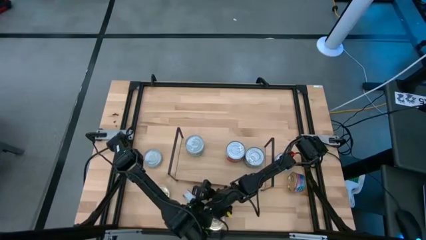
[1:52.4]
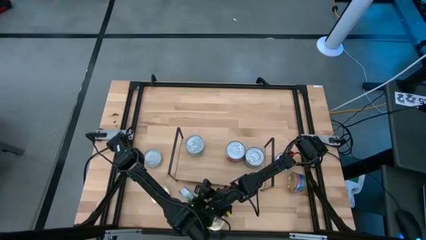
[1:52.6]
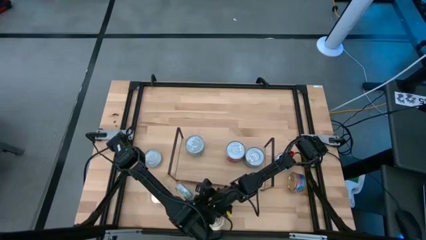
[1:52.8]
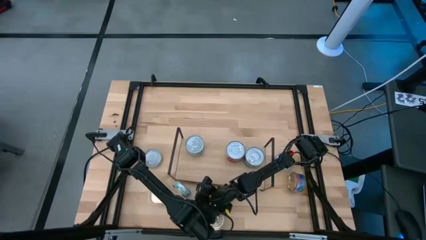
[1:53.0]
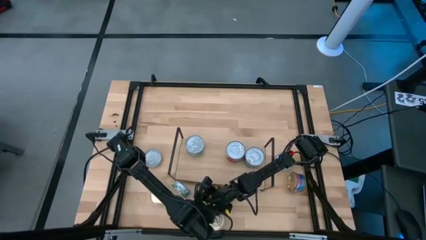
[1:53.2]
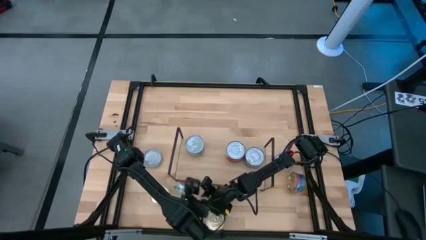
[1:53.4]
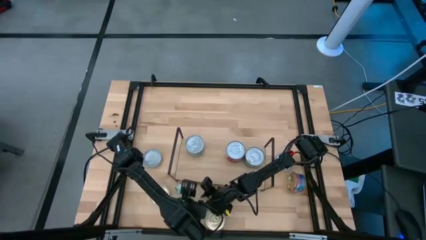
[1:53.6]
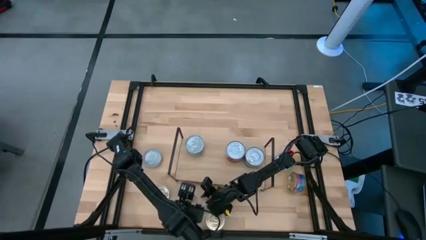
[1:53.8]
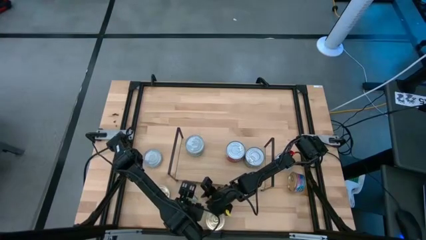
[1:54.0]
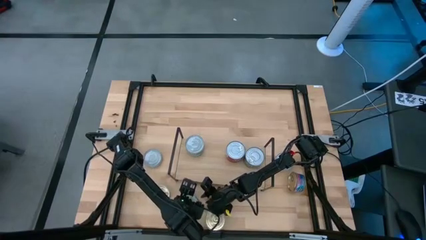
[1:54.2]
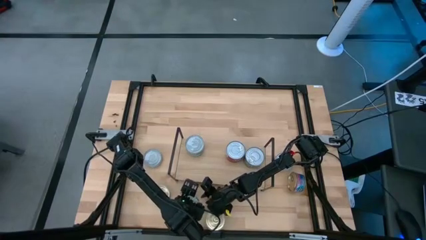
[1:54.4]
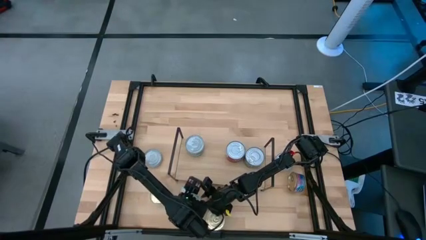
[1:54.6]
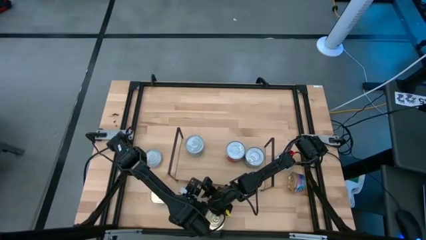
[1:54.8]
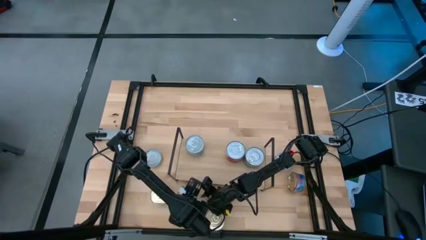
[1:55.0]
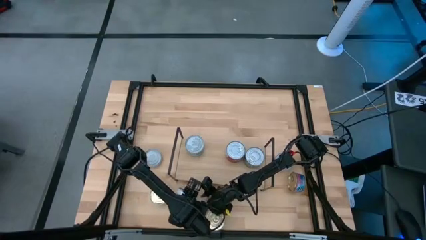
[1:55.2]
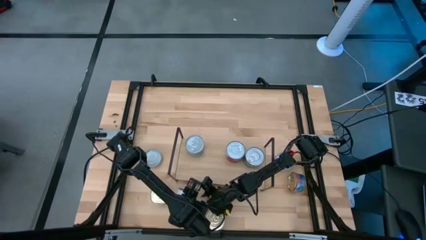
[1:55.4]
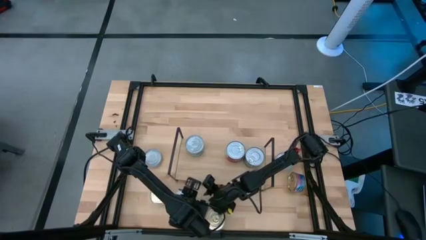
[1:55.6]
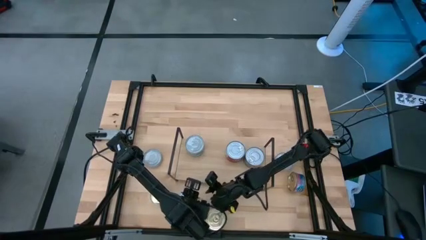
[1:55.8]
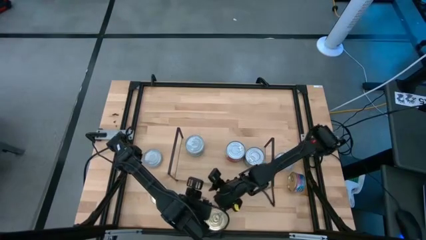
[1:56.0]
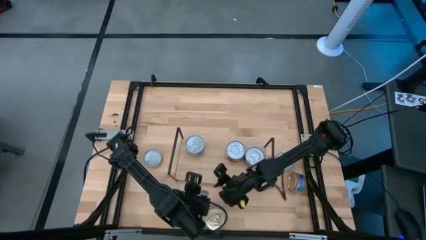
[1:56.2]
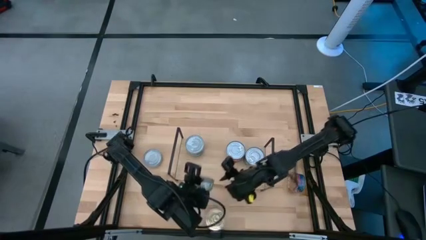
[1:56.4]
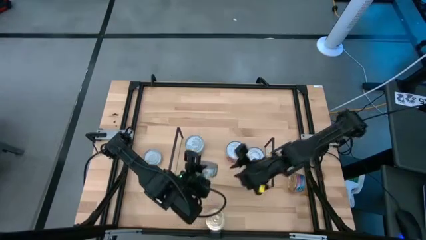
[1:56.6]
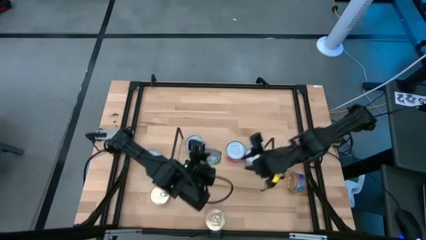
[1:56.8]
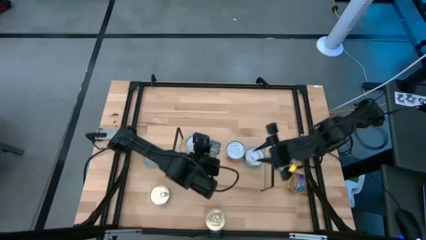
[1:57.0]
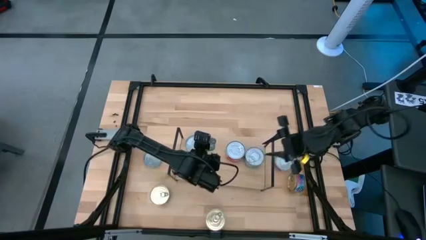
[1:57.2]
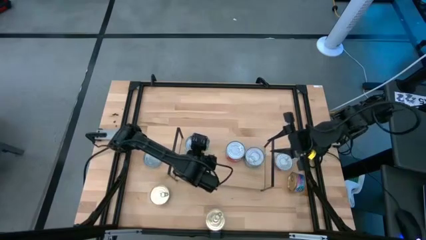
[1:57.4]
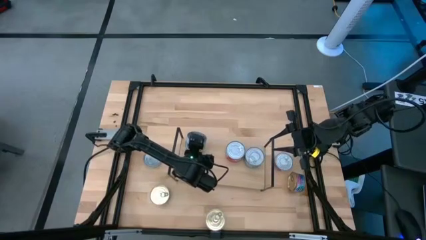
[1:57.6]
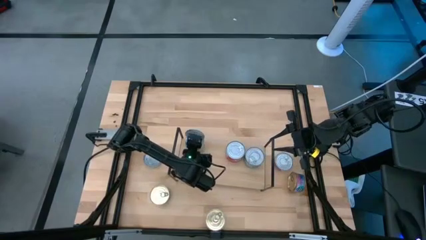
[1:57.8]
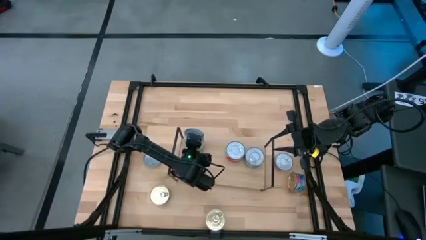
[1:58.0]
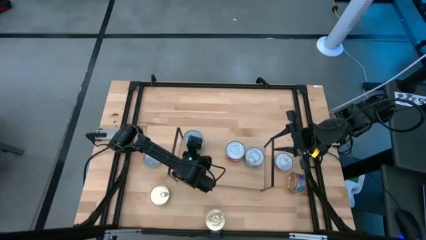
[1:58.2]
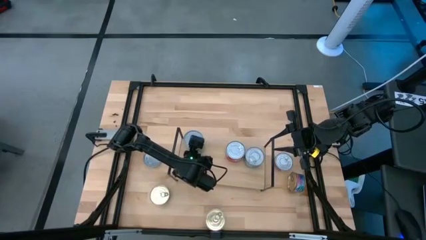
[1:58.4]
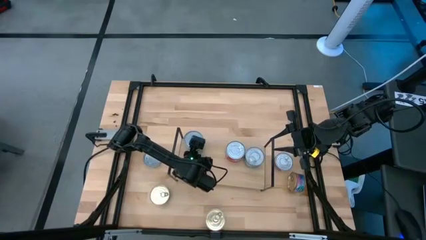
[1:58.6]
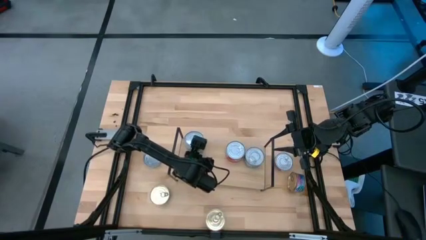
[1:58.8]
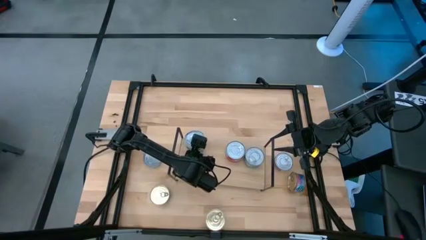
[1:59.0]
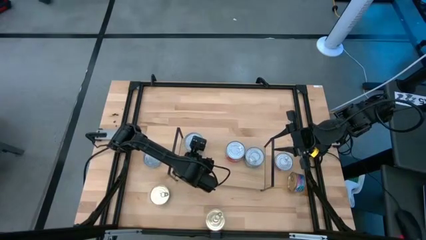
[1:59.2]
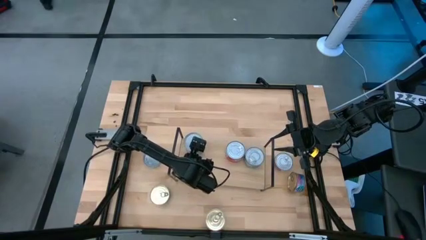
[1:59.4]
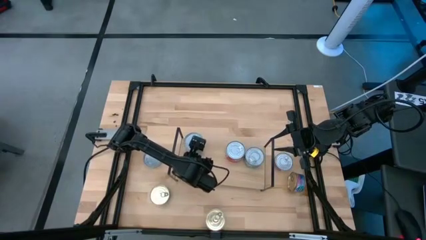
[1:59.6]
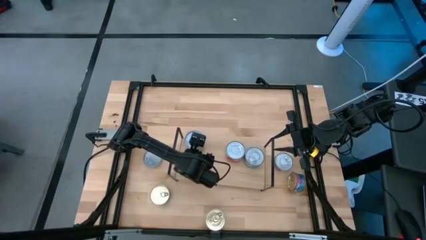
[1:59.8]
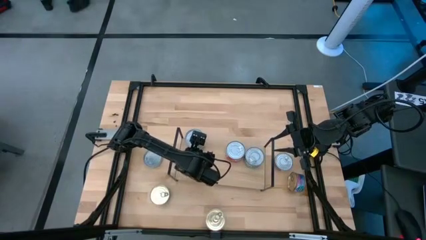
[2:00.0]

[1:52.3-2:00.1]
Task: Stack canned seafood by type on shelf
Stack the green white tuna can on top of the green white tuna cans on the shelf

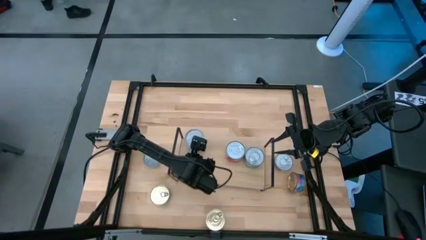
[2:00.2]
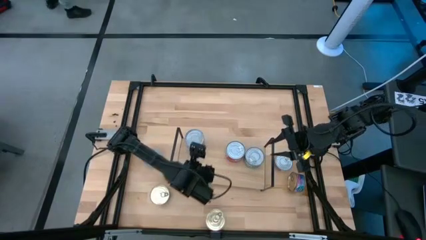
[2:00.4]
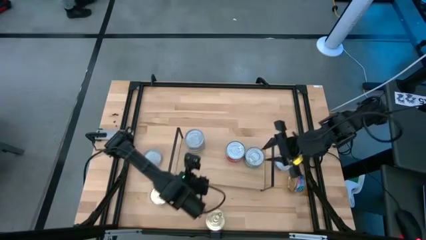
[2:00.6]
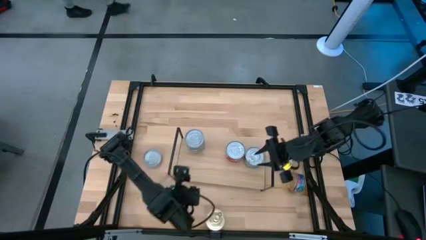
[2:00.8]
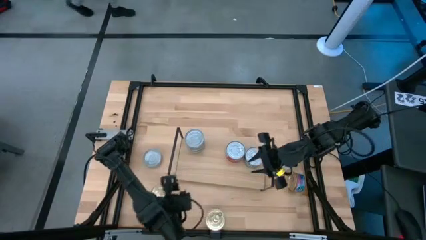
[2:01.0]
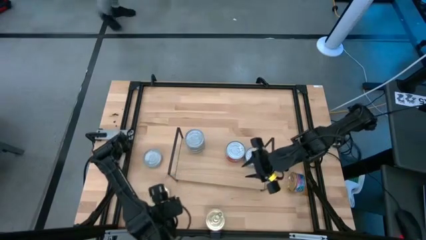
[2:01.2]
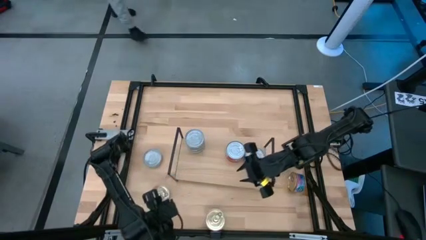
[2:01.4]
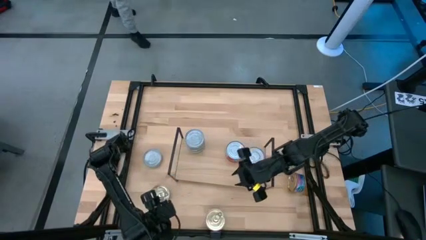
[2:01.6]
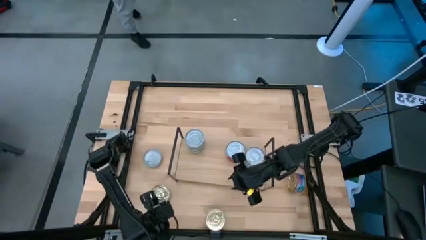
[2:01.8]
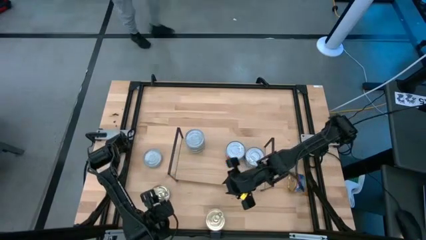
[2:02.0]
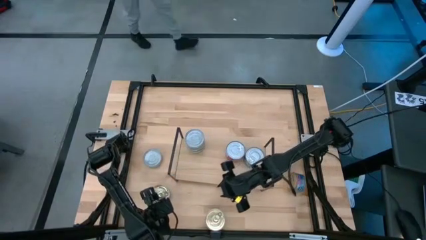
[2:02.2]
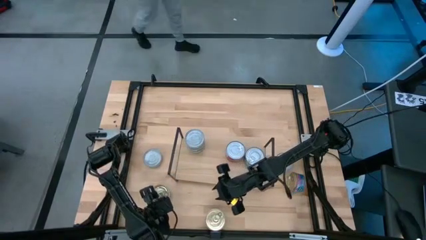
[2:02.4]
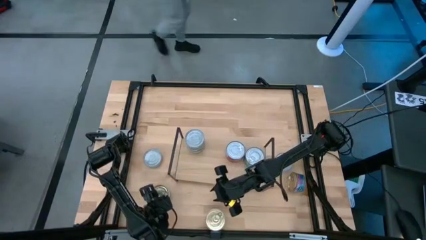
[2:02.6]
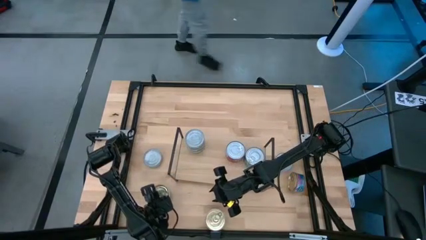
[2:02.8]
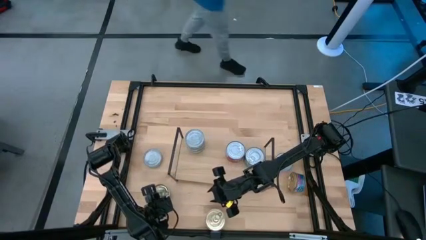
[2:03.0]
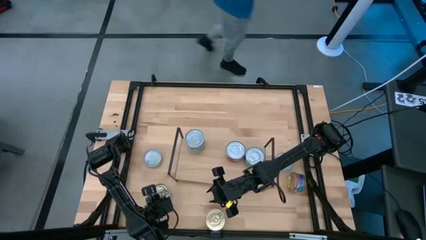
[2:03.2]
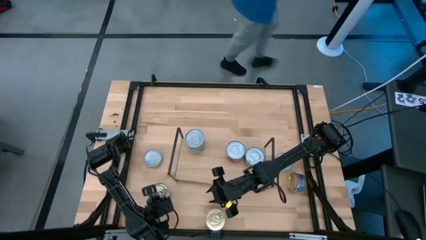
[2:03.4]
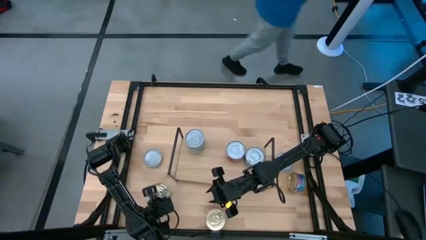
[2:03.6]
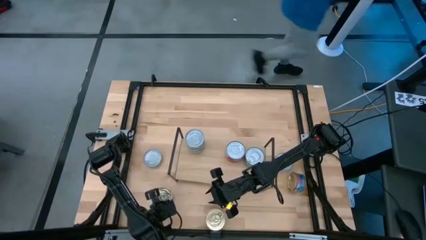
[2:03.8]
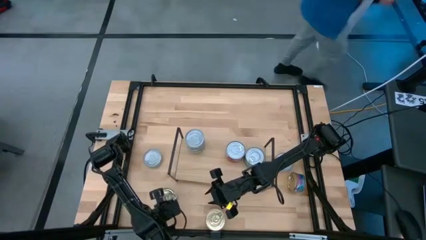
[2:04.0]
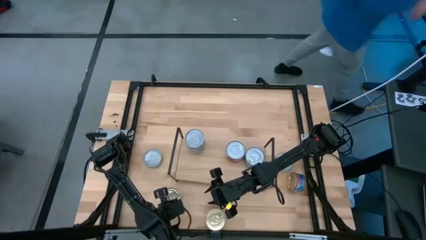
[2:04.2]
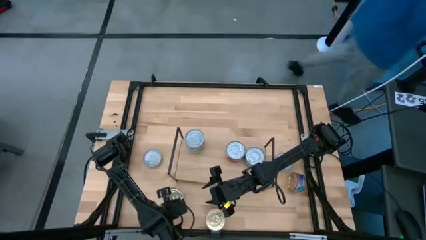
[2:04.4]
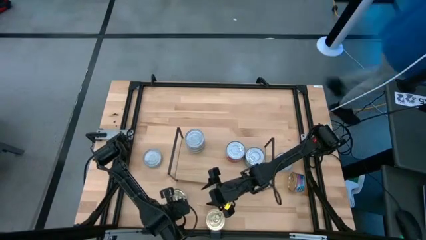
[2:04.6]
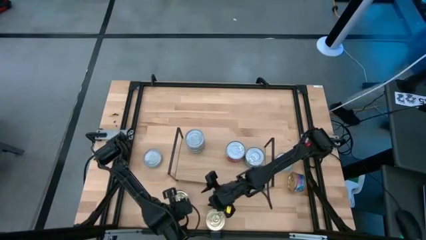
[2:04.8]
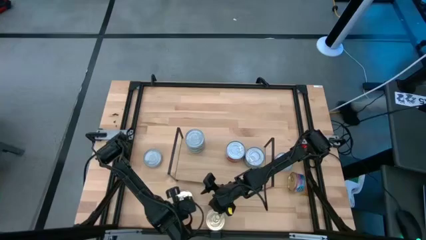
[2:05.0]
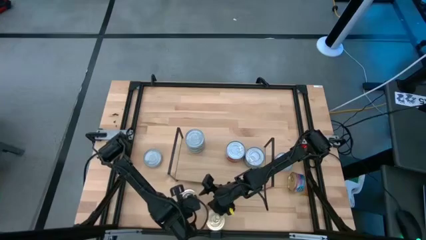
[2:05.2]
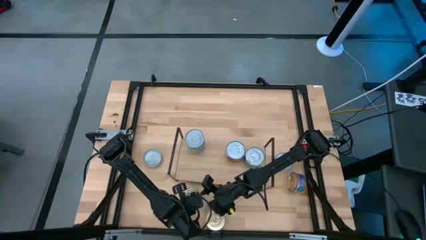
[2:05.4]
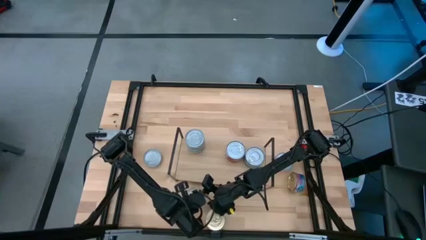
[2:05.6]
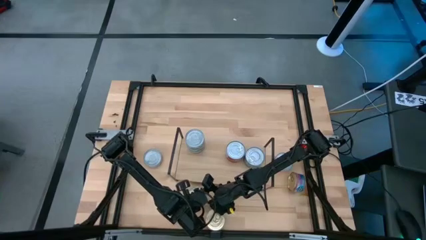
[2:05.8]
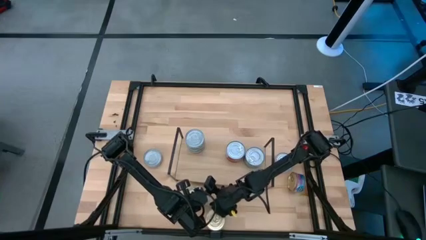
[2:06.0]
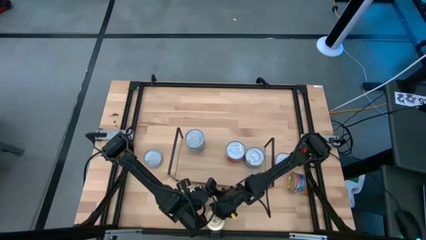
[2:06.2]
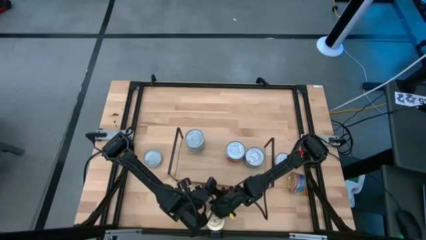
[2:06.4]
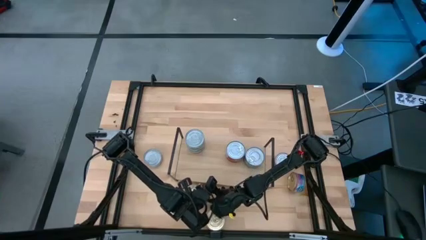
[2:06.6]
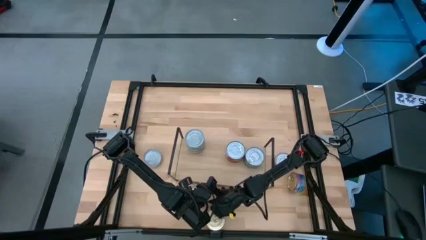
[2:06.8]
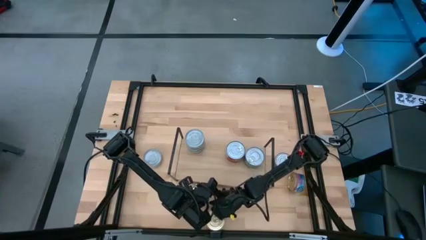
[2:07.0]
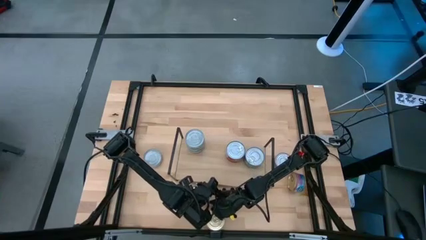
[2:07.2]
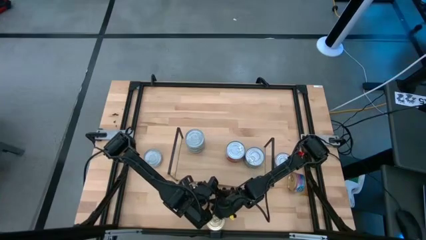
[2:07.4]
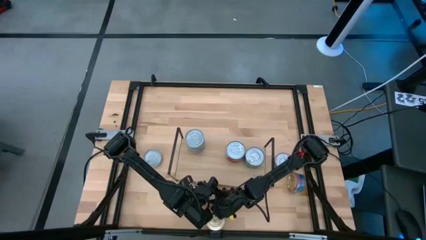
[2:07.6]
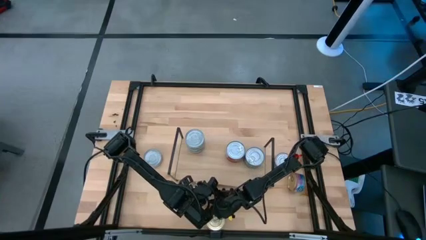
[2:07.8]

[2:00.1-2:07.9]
Put the blue pink tuna can on the shelf

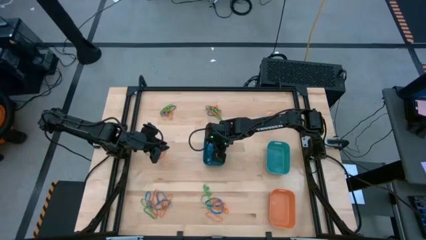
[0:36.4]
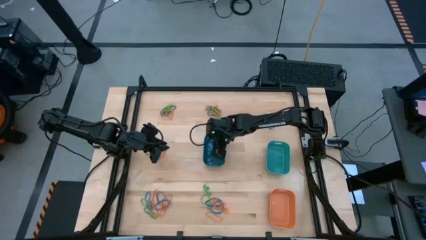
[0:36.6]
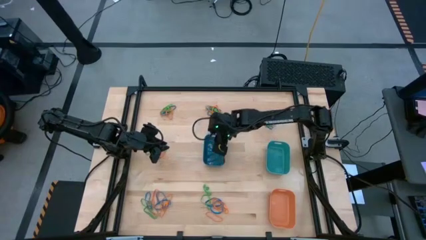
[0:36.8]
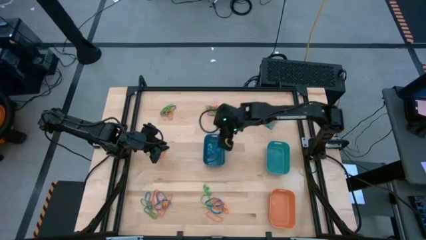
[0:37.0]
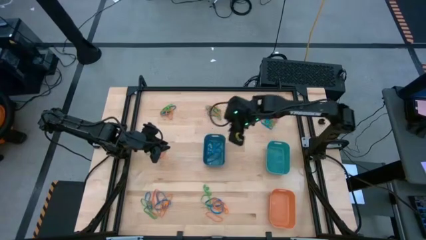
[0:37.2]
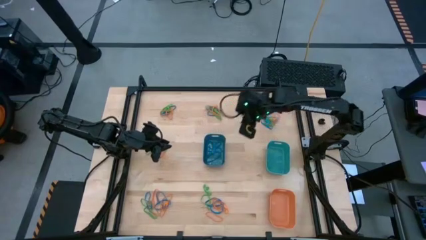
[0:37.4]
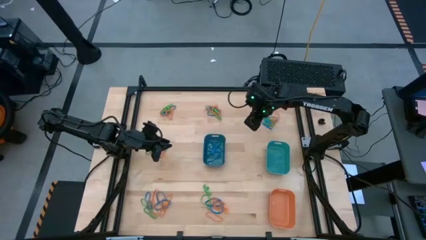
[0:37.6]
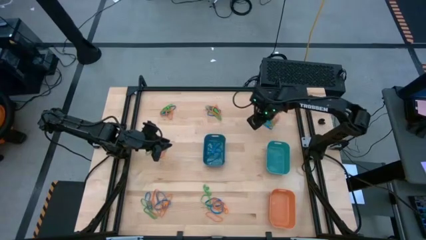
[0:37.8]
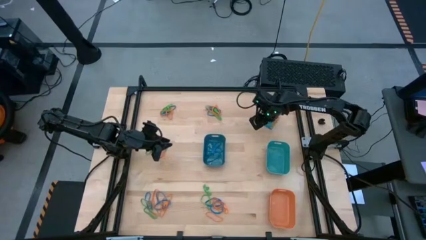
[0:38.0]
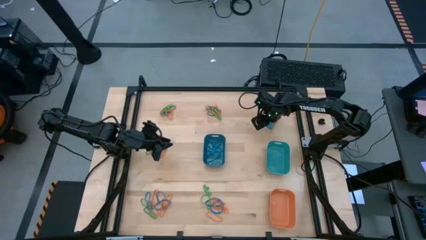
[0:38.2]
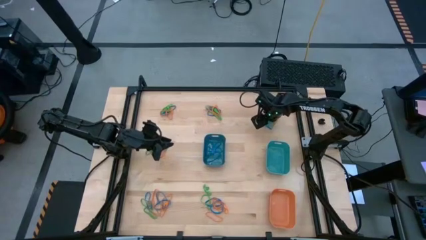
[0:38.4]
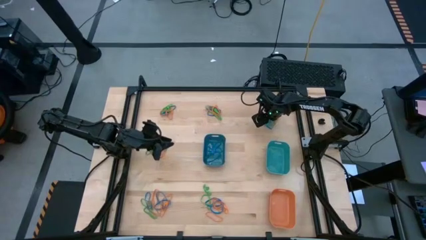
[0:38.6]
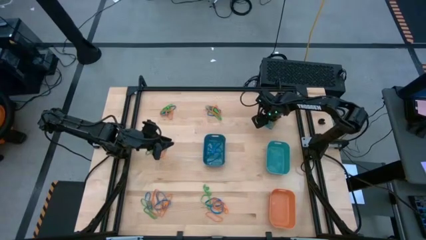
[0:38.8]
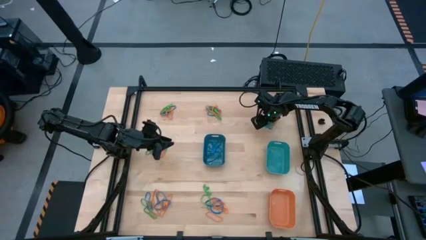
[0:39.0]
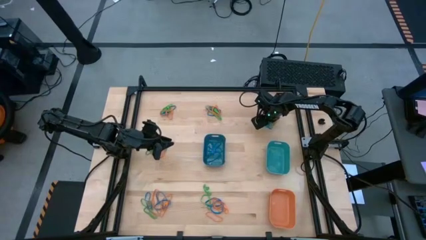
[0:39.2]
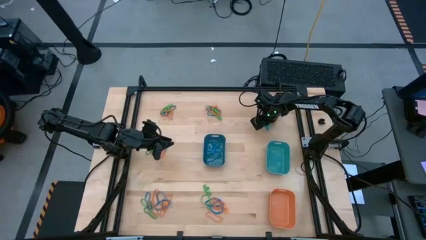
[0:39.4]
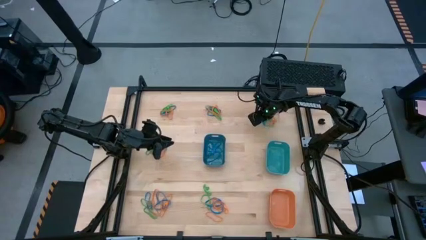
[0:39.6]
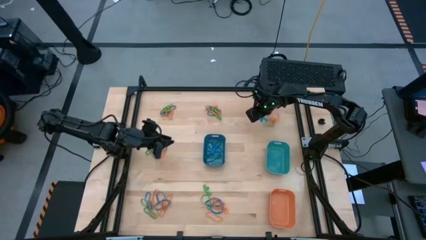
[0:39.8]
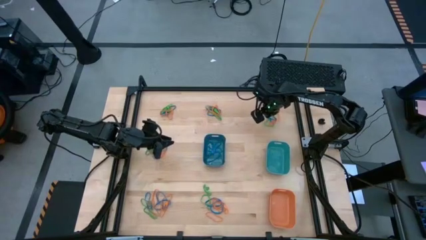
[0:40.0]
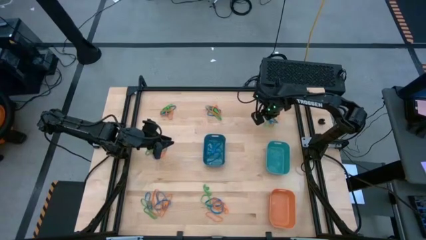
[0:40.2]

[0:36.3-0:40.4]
Task: Sort rubber bands into baskets
Put the blue rubberband into the blue bin
